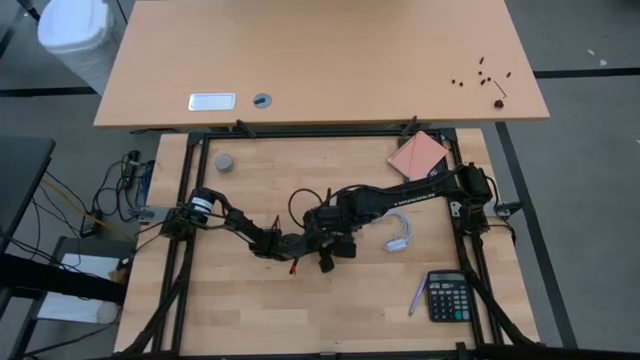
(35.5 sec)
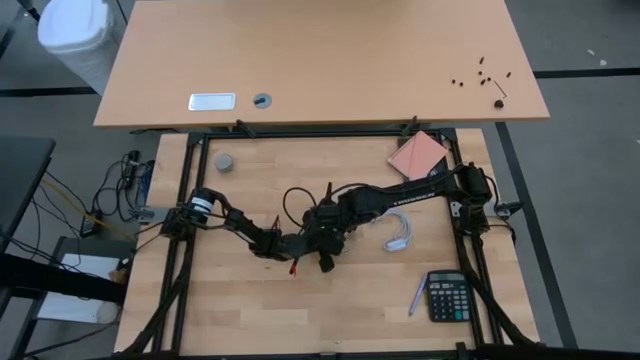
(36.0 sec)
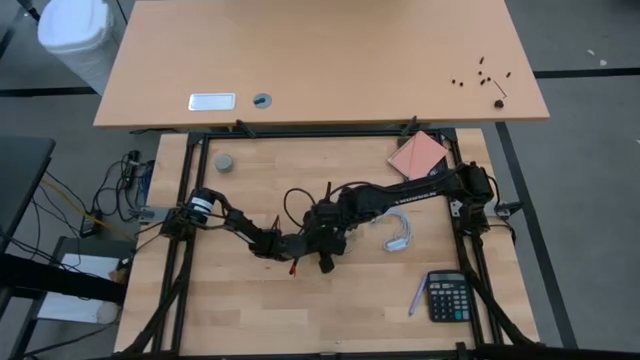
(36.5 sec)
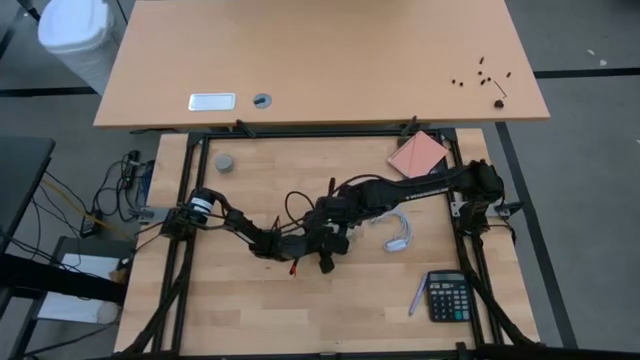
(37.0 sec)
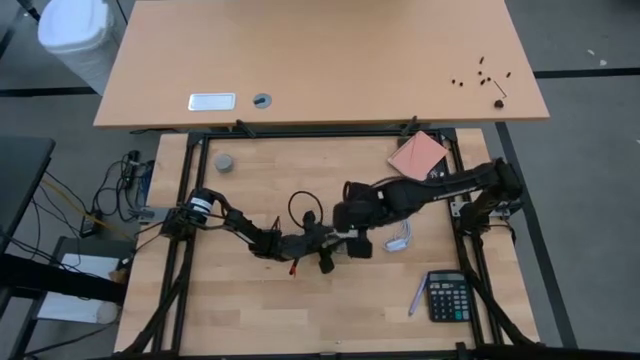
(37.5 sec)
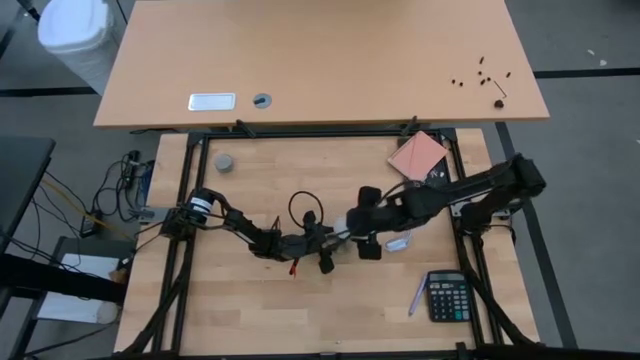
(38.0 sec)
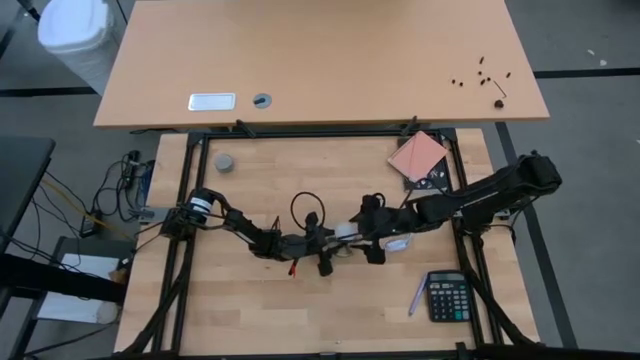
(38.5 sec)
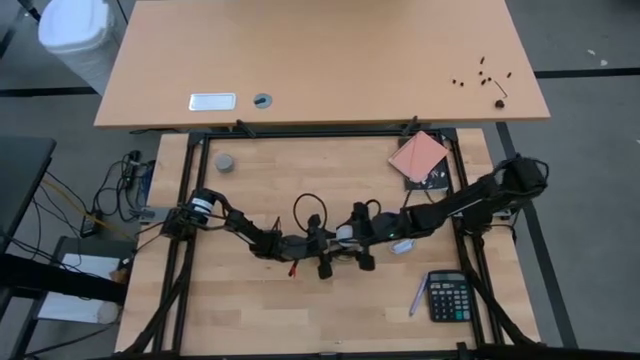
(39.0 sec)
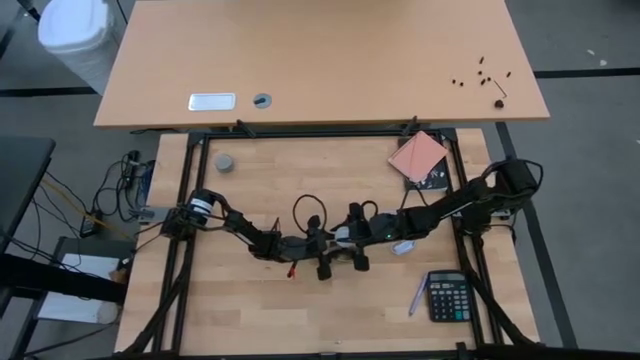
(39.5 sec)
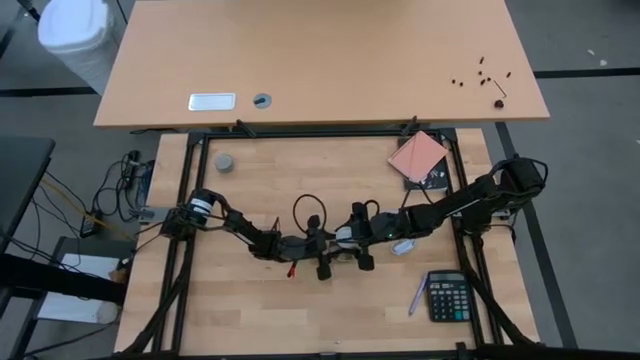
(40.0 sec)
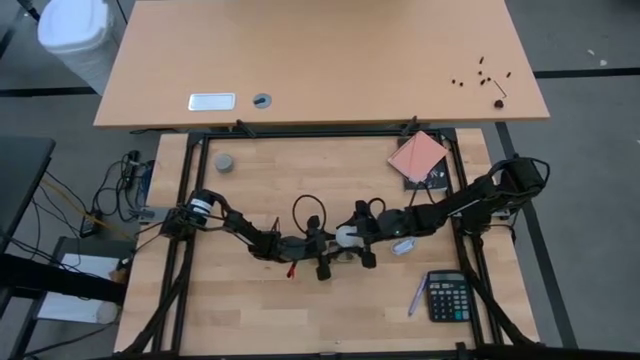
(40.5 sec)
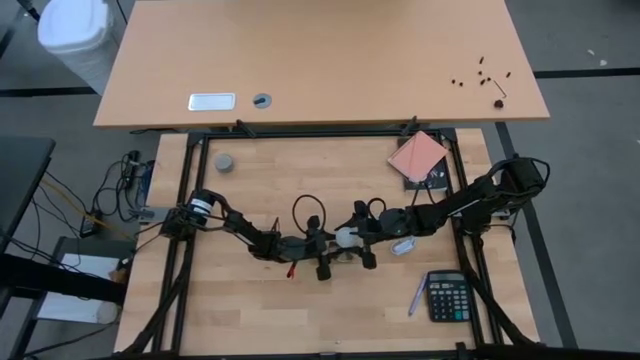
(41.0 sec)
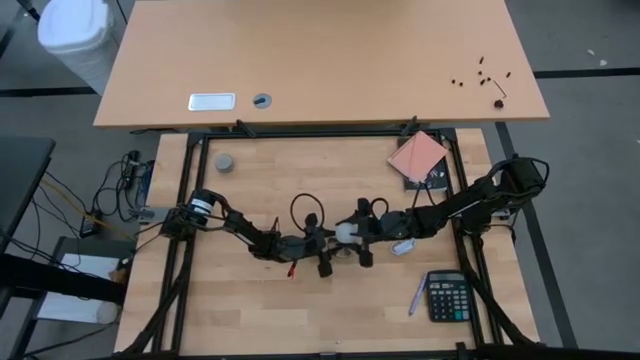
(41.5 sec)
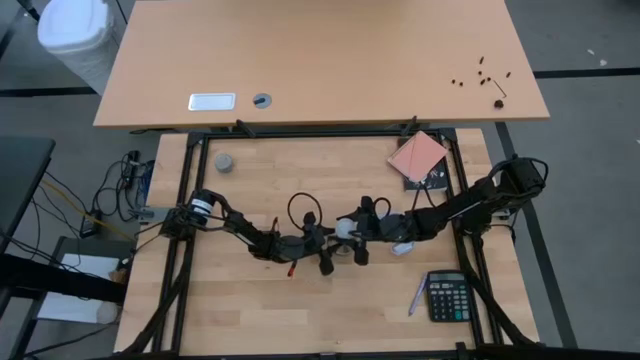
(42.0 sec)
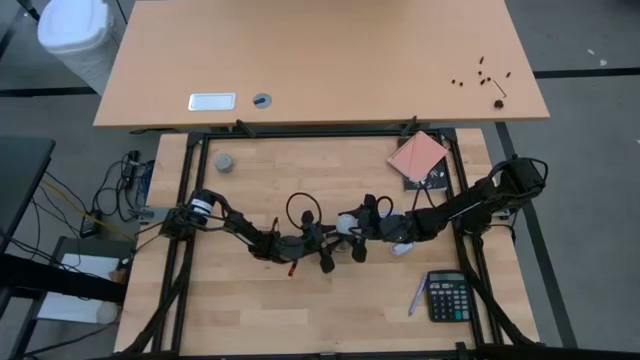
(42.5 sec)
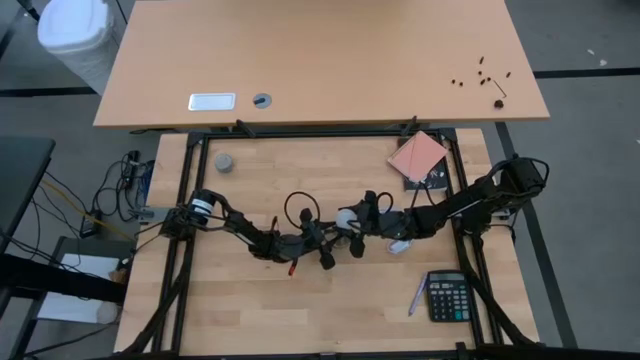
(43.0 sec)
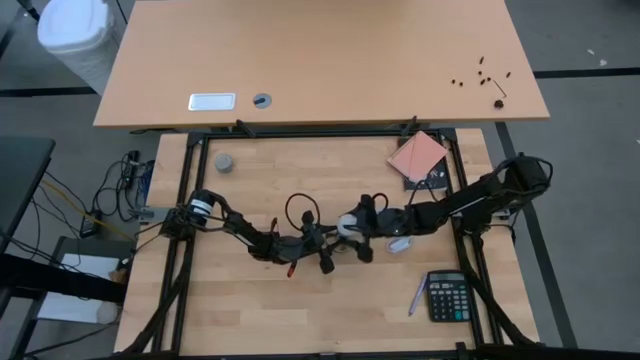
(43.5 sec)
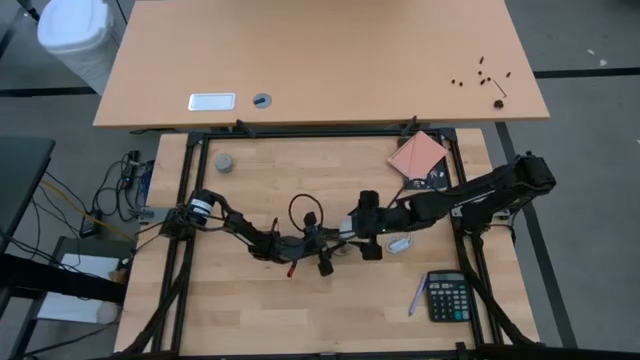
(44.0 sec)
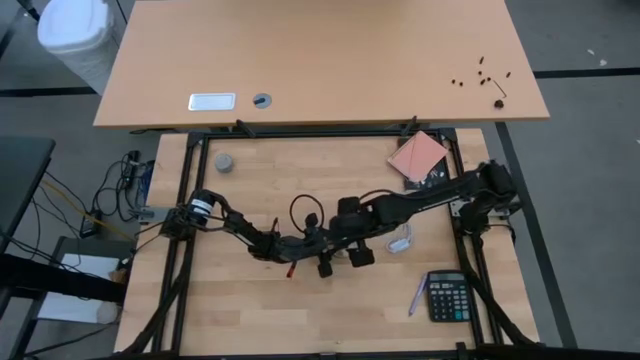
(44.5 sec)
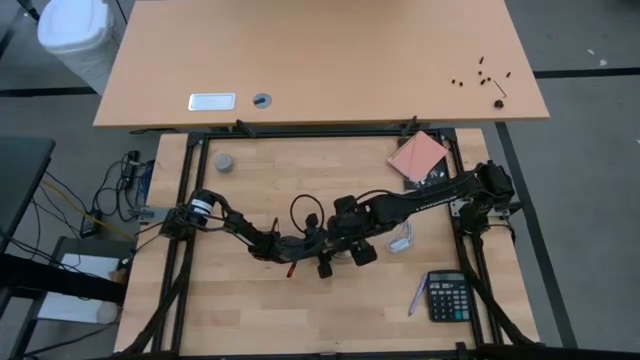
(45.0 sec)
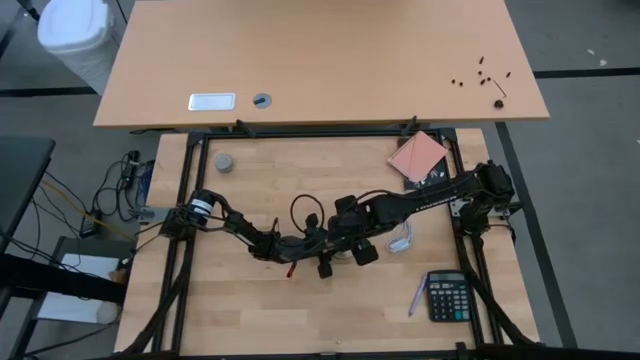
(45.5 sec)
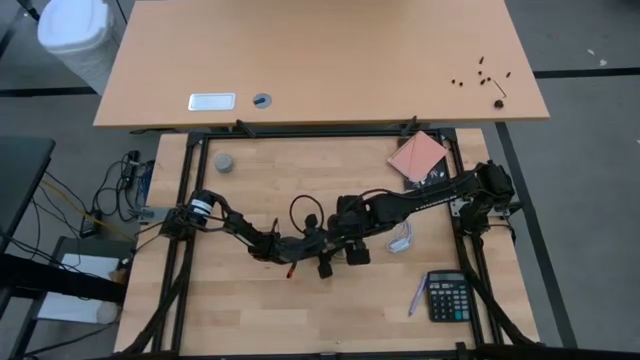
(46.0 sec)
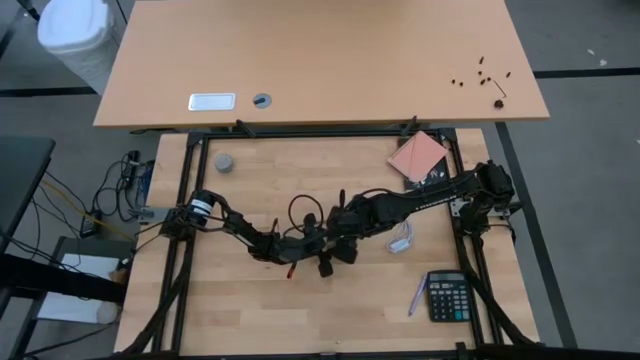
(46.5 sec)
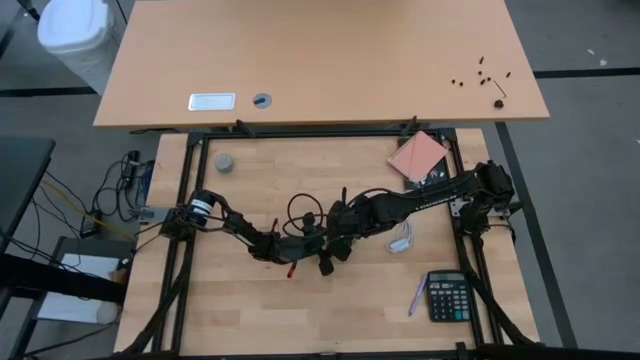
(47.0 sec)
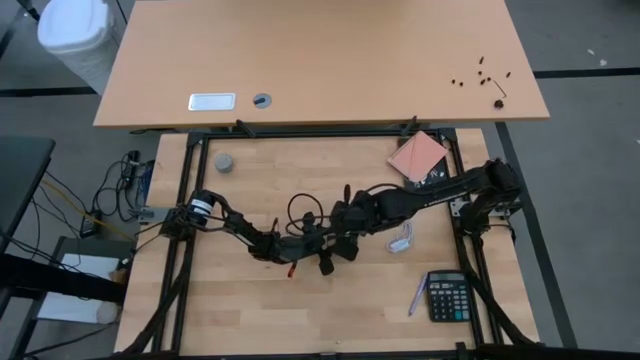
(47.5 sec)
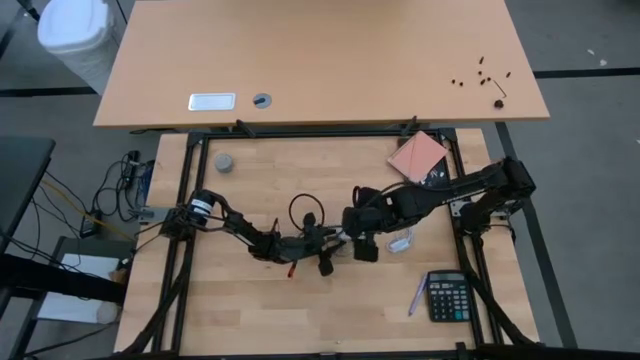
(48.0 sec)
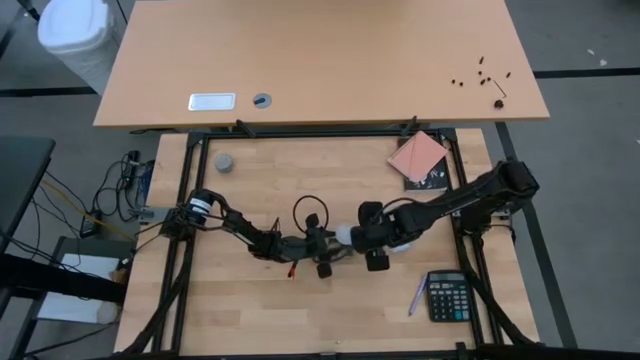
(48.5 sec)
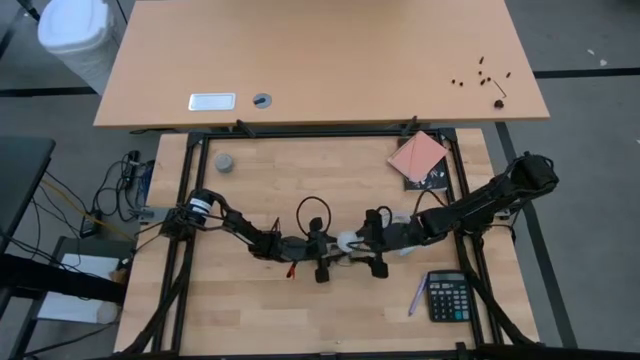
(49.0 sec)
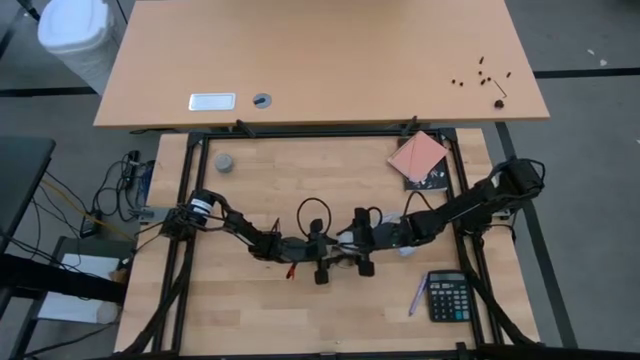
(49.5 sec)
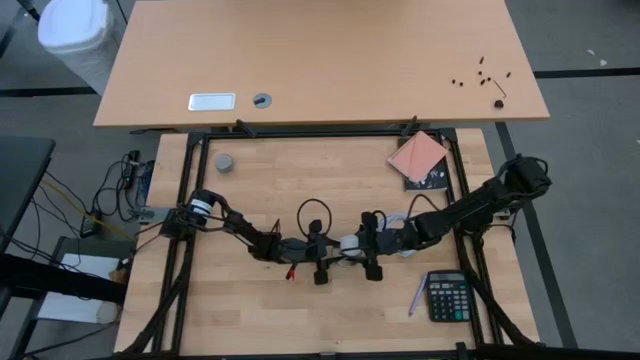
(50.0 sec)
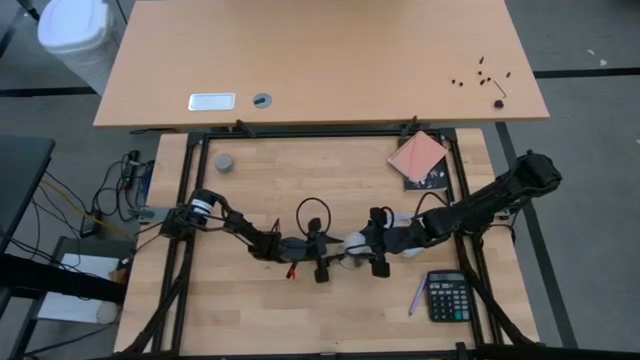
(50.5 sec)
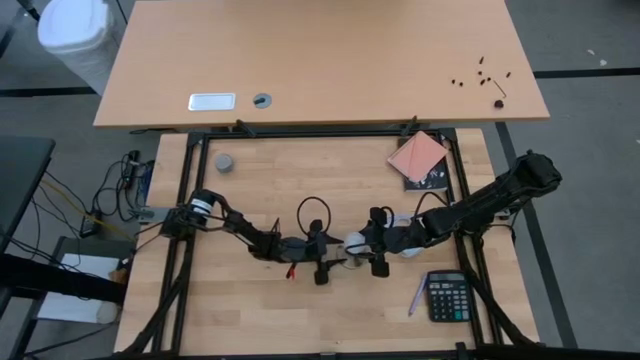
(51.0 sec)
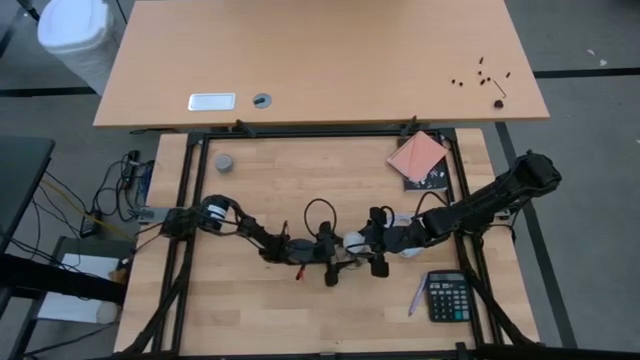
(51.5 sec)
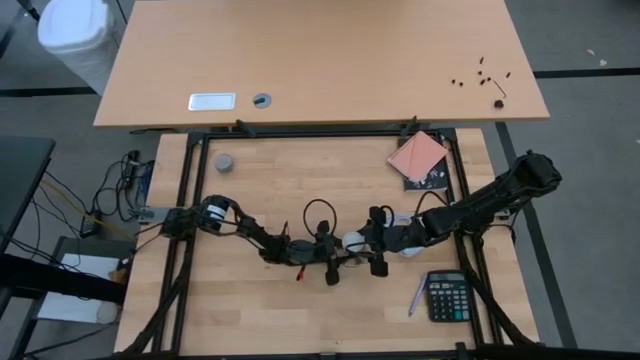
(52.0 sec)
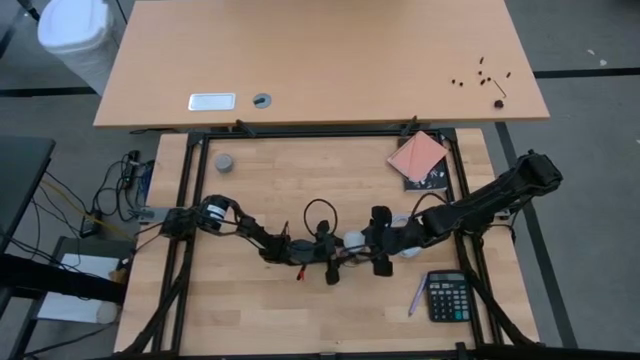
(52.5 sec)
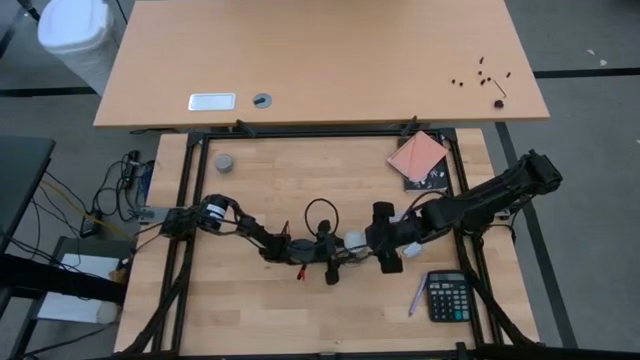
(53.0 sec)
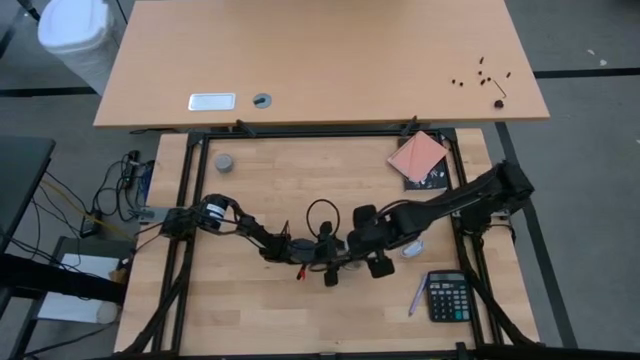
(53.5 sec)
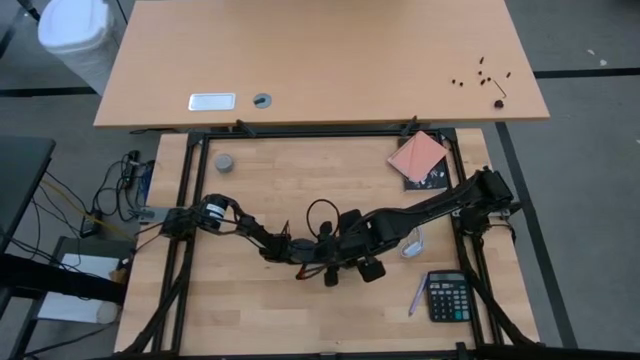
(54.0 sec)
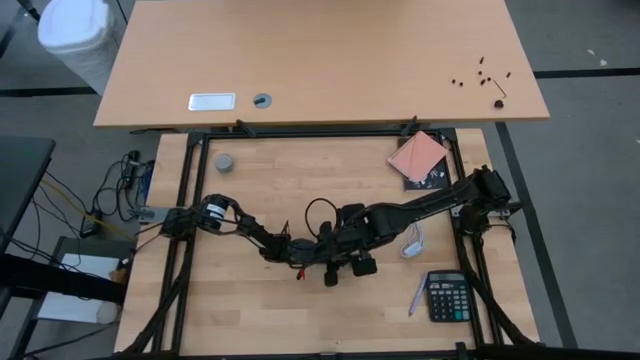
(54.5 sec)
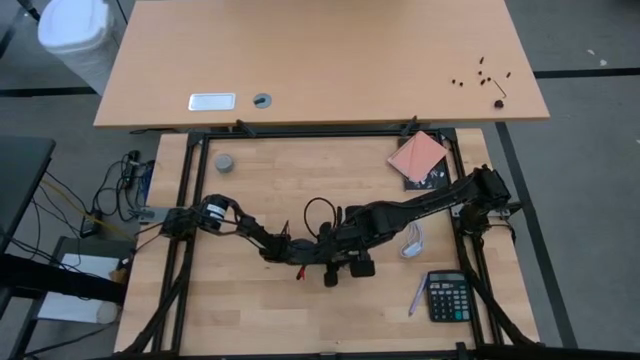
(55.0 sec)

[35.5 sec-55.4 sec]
Task: Screw lightbulb
Insert the white lightbulb into the golden lamp
